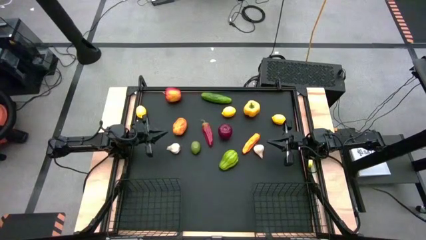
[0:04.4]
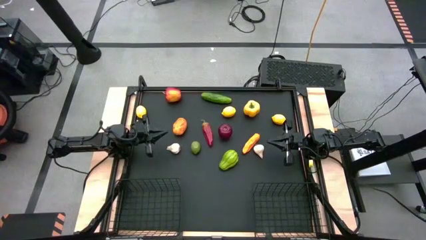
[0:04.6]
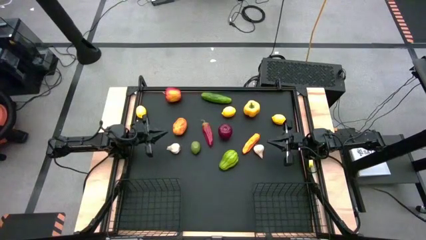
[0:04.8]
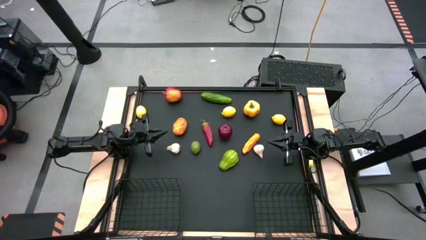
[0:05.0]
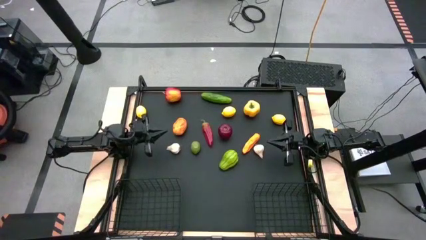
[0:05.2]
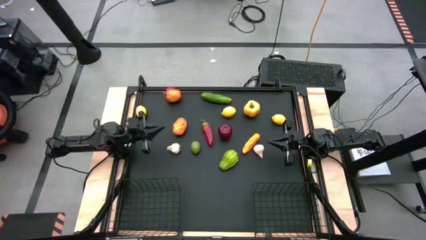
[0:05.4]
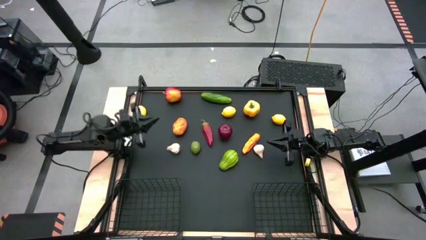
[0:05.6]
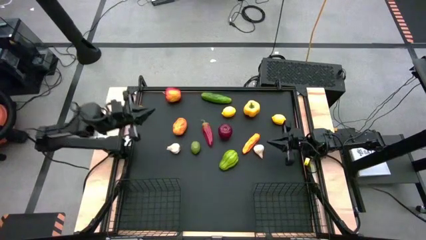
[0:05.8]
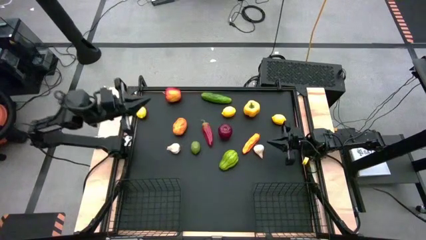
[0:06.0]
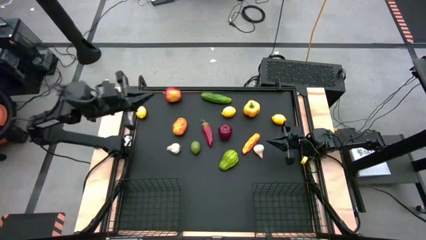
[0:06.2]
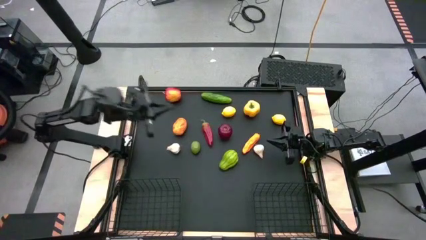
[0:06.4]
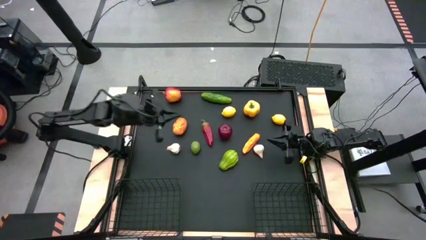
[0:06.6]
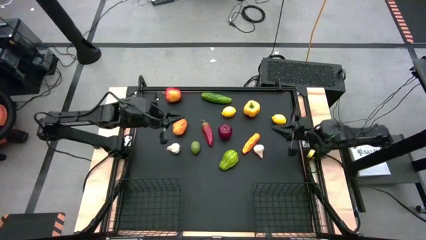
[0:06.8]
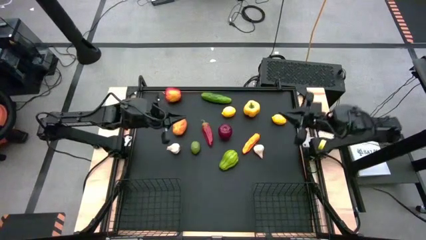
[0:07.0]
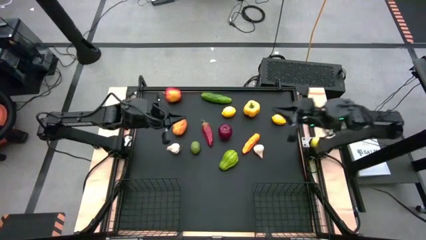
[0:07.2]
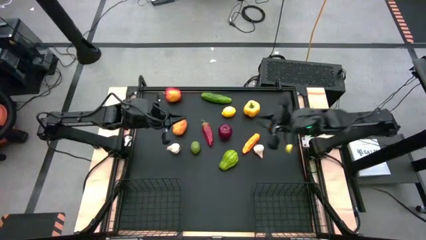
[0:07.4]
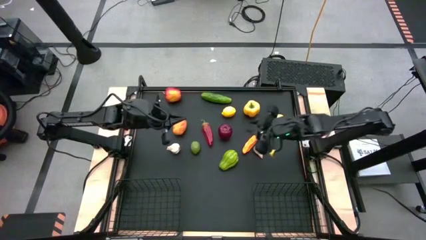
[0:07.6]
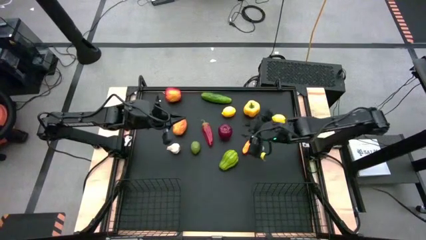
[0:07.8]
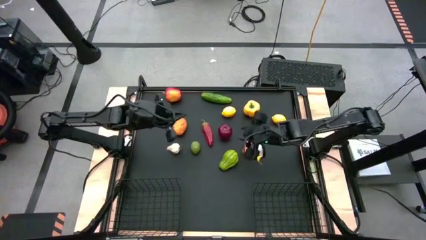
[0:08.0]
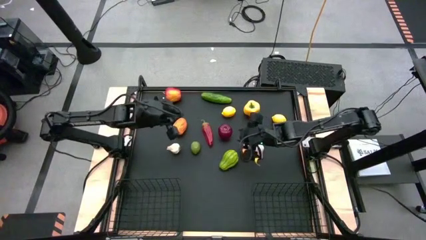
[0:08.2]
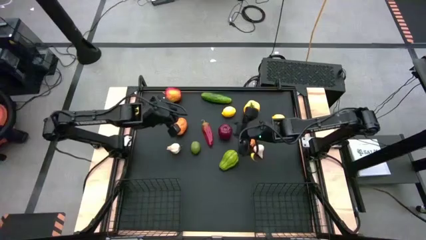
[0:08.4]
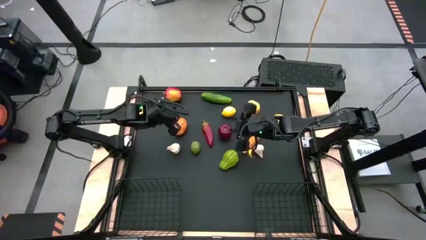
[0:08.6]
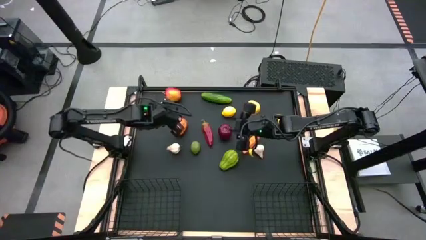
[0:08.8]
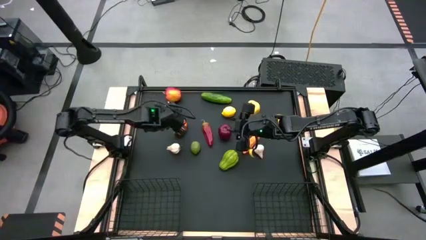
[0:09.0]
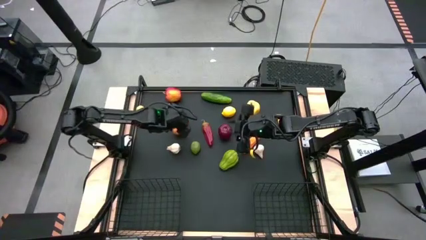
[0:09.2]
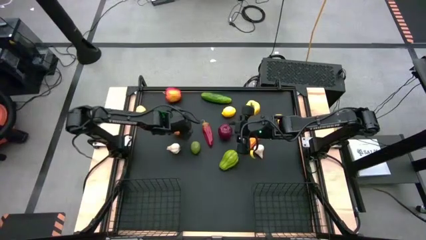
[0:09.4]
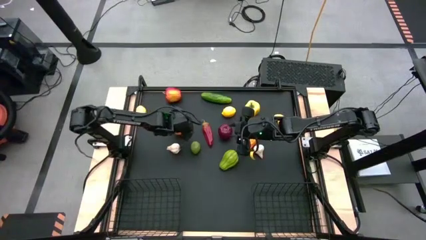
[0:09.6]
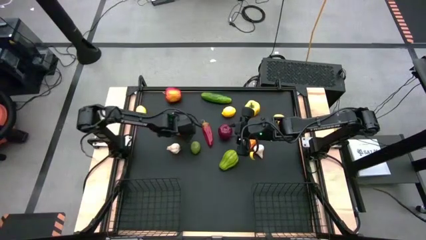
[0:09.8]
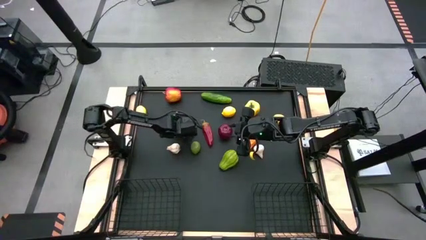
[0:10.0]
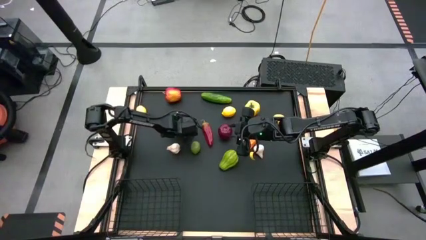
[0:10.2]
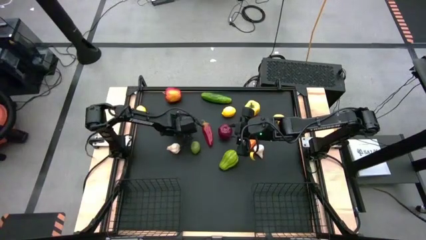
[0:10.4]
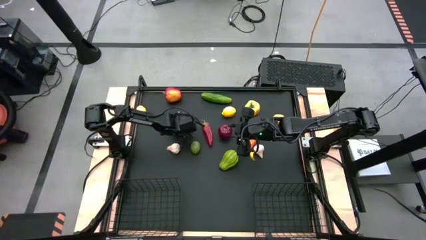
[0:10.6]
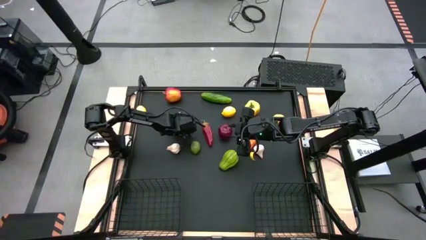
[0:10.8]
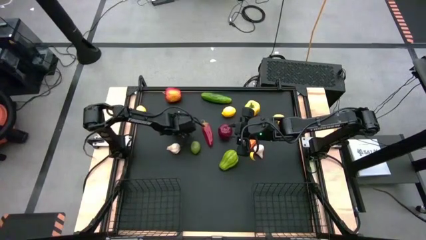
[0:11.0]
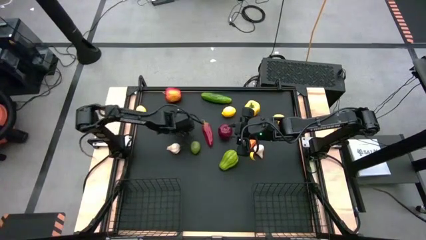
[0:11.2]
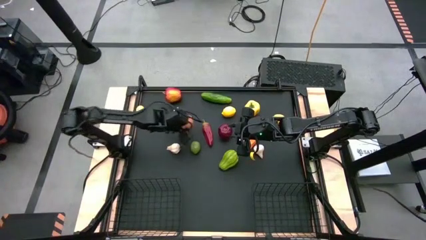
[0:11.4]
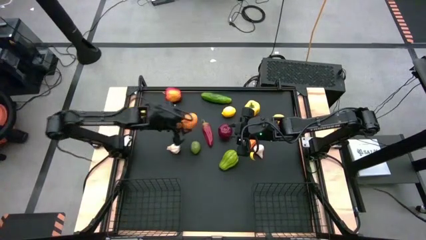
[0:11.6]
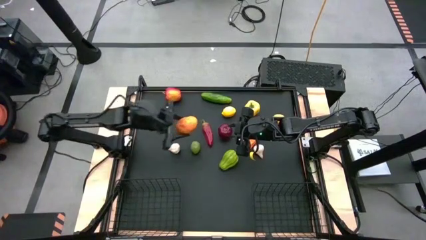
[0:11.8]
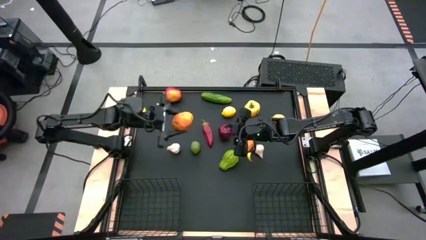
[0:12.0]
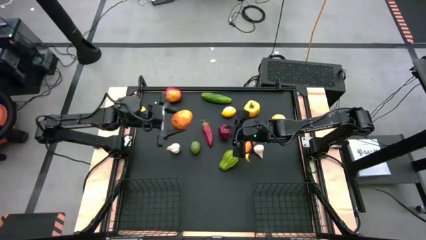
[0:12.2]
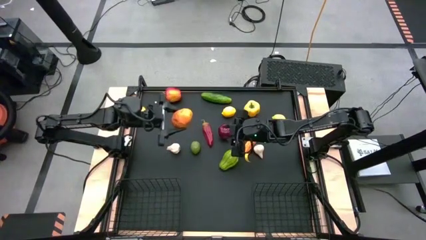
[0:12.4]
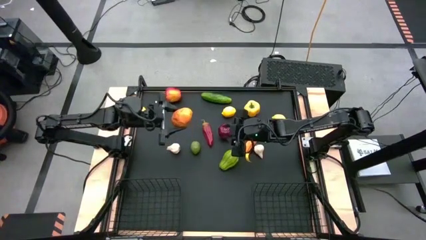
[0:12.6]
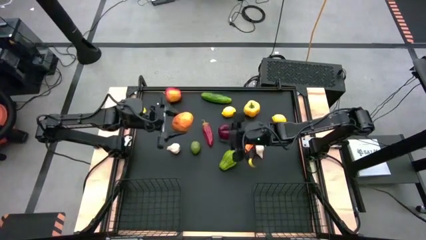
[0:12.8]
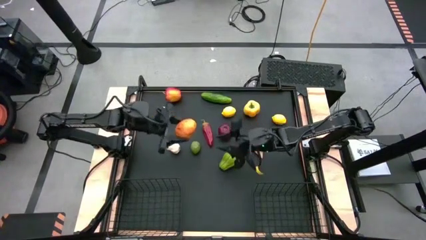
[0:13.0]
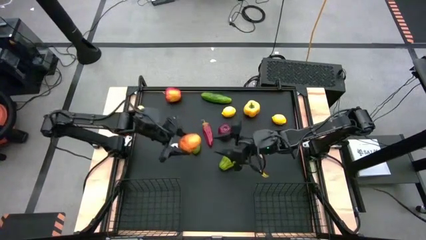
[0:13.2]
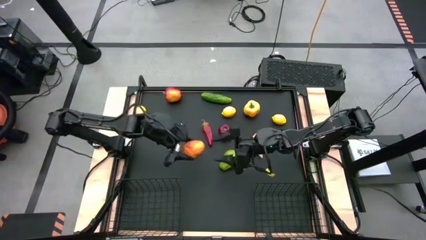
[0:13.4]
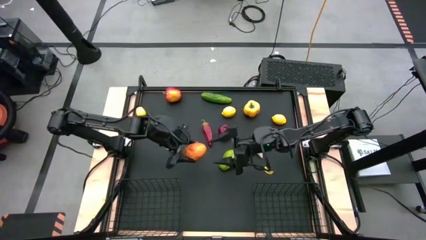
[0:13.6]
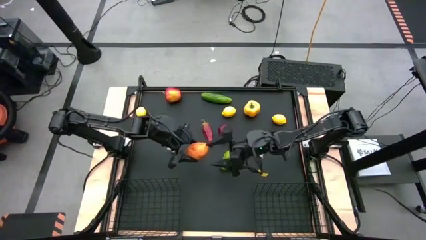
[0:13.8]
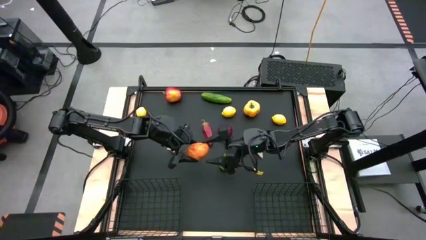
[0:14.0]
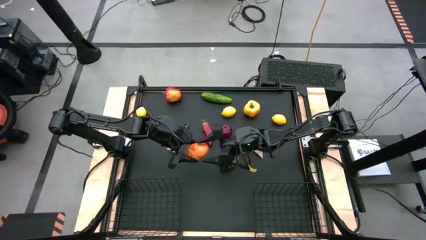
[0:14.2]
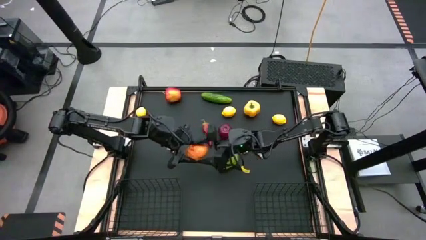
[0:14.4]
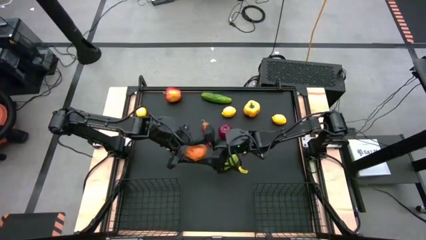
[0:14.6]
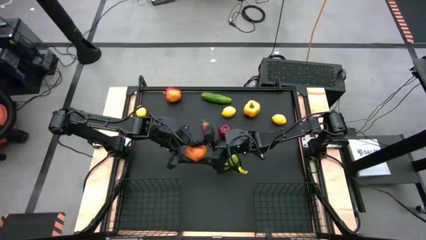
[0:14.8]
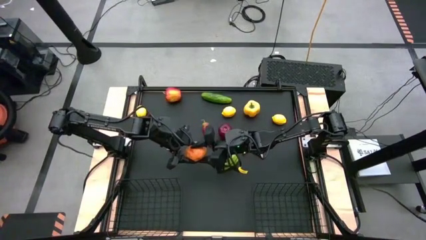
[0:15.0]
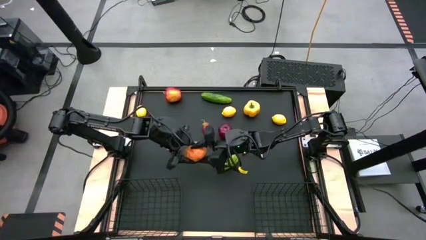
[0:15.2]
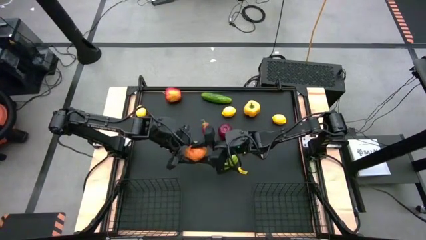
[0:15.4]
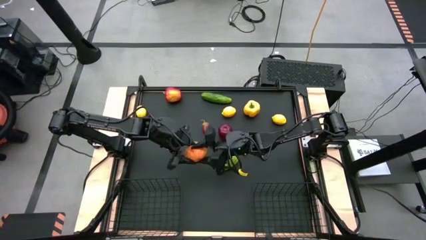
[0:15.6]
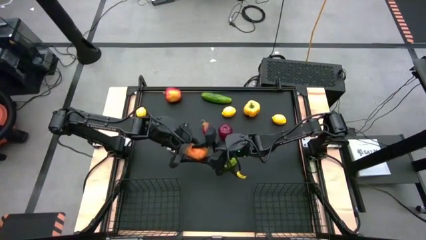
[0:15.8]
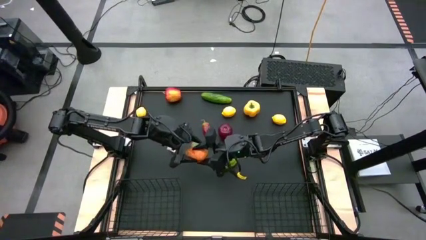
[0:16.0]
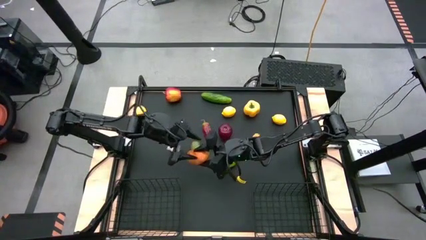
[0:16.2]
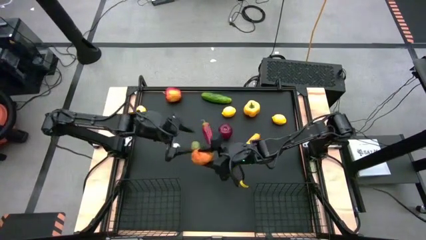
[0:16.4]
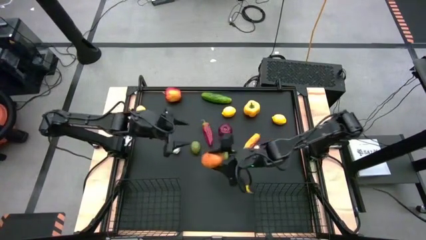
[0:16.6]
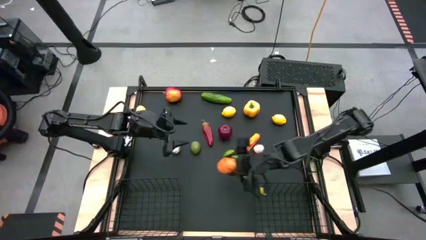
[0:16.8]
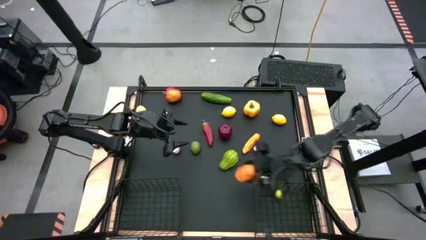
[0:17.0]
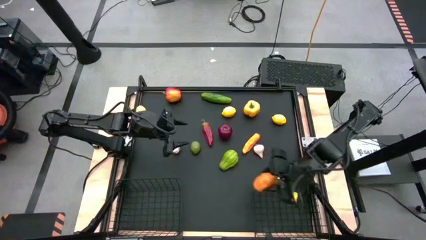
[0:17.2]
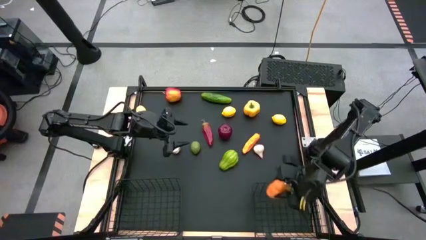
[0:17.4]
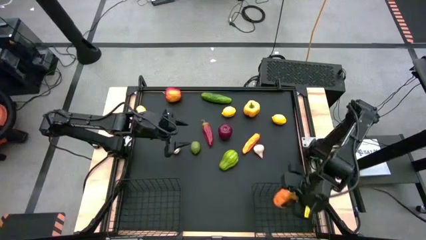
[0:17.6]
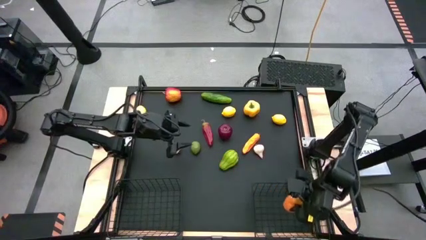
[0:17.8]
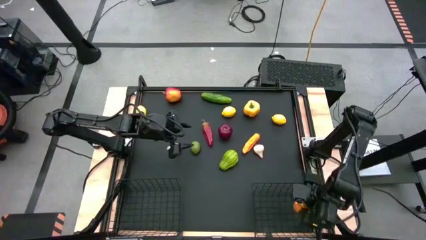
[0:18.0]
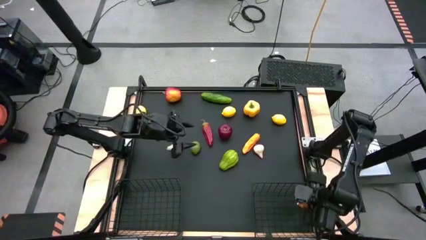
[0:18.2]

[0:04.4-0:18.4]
Task: Sort produce into baskets
Put the yellow mango in the right wire basket
